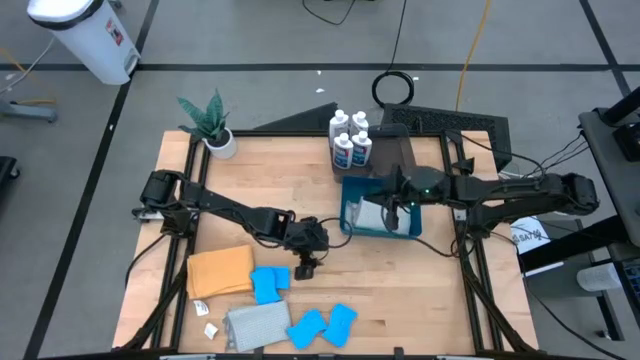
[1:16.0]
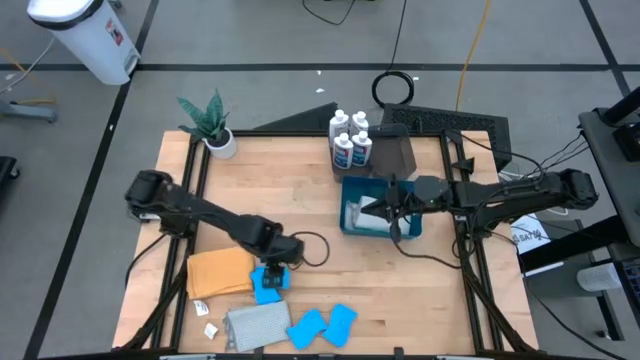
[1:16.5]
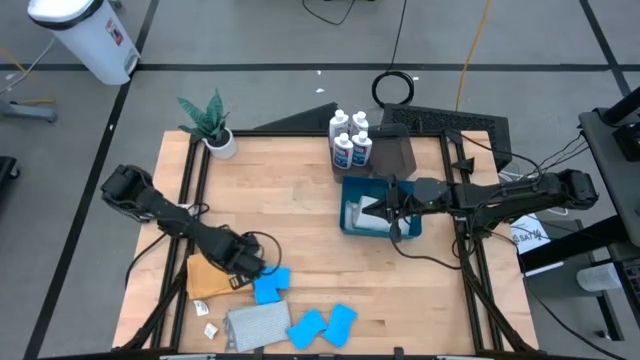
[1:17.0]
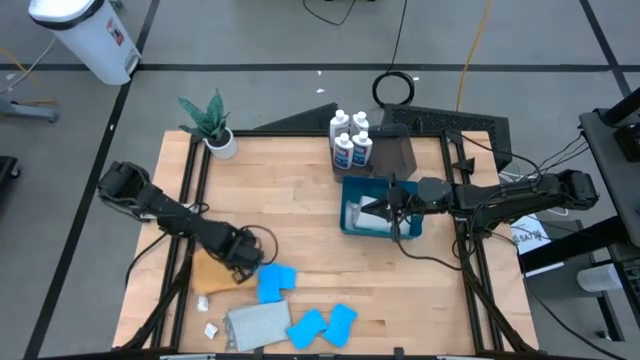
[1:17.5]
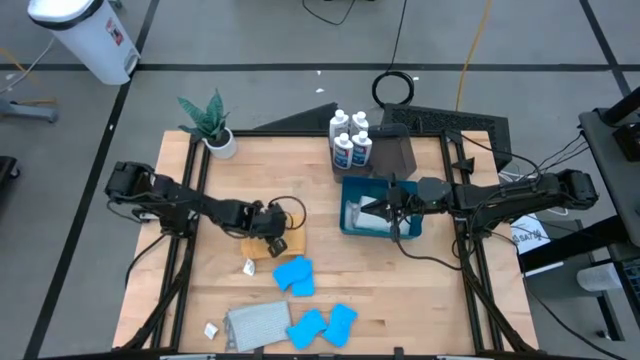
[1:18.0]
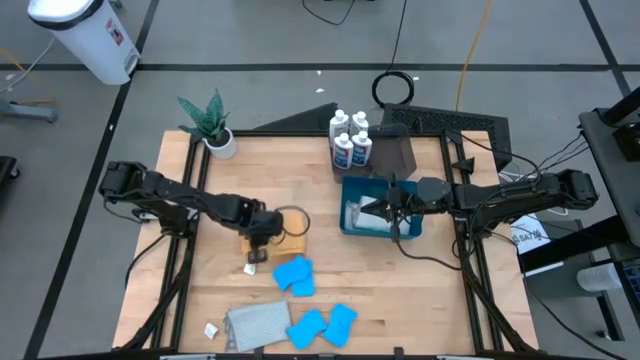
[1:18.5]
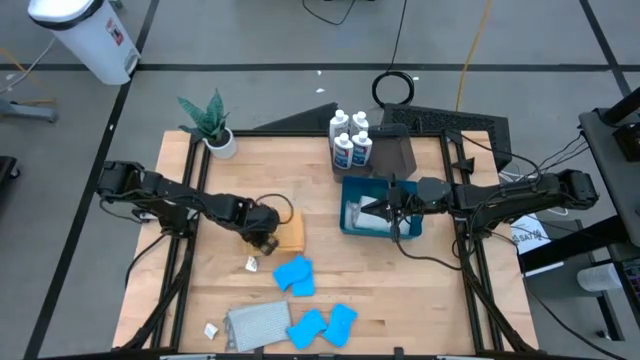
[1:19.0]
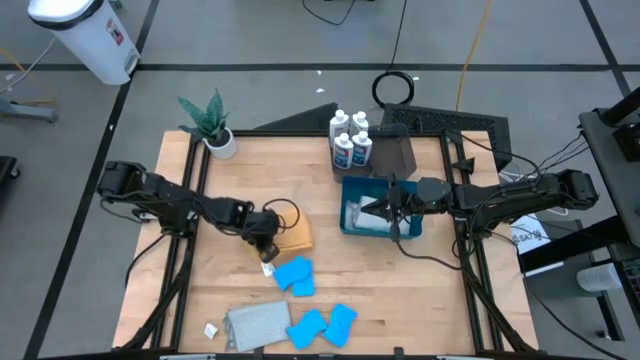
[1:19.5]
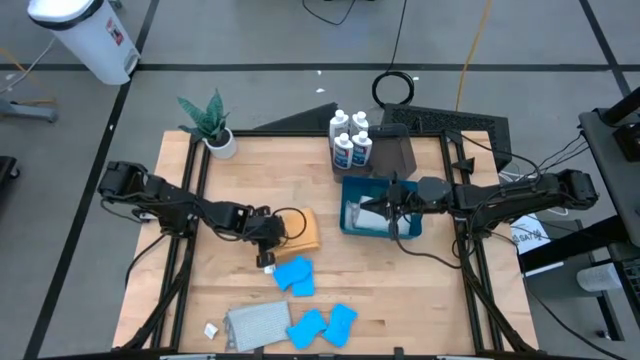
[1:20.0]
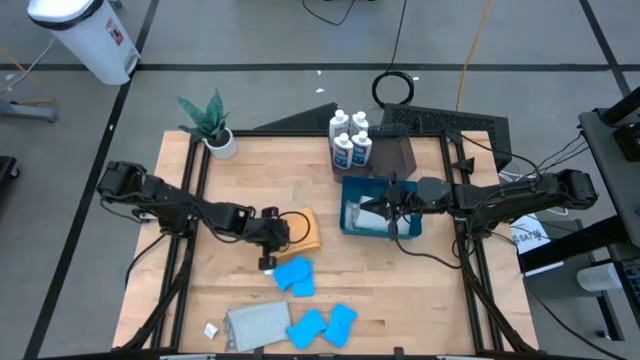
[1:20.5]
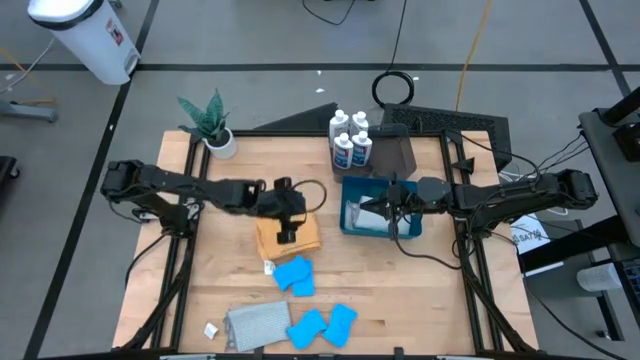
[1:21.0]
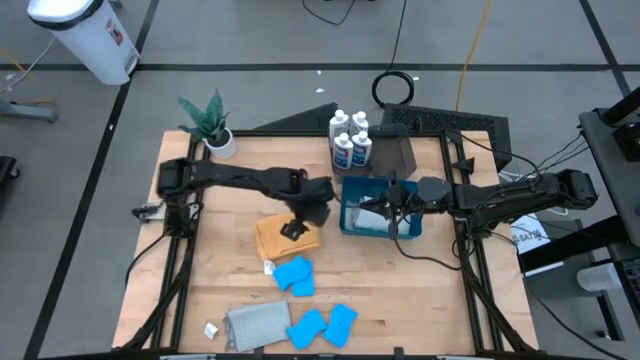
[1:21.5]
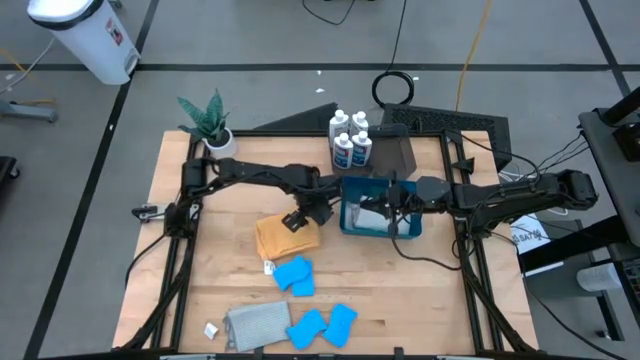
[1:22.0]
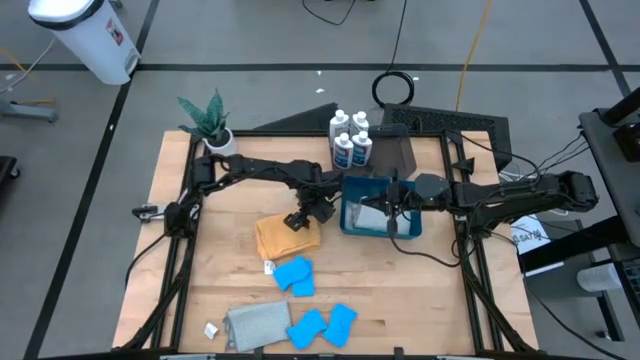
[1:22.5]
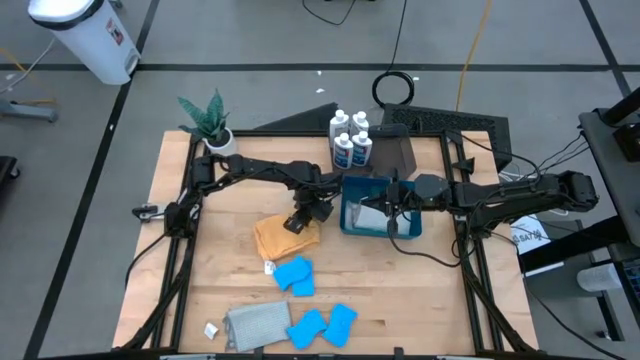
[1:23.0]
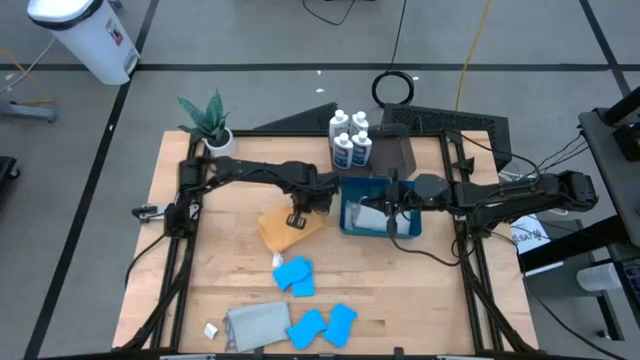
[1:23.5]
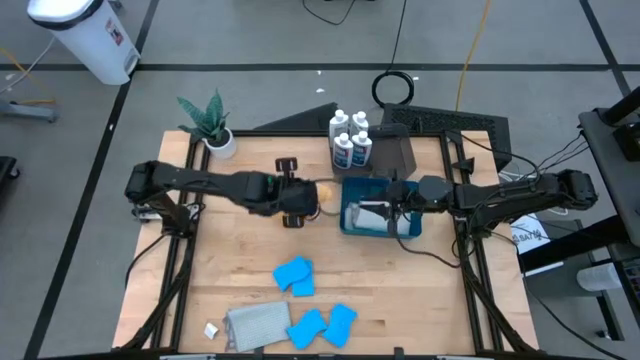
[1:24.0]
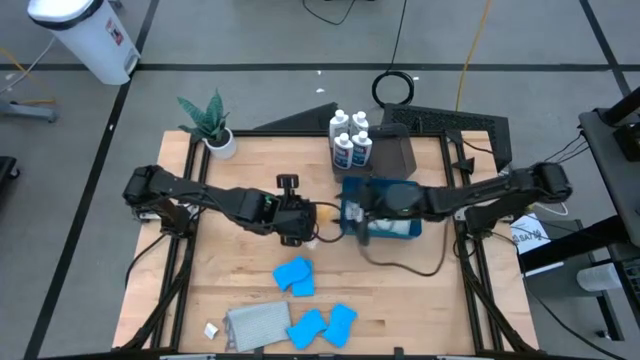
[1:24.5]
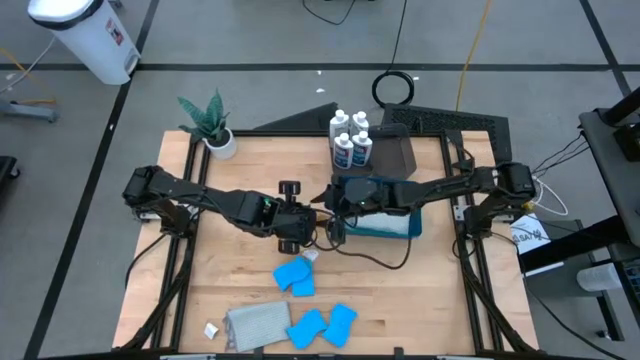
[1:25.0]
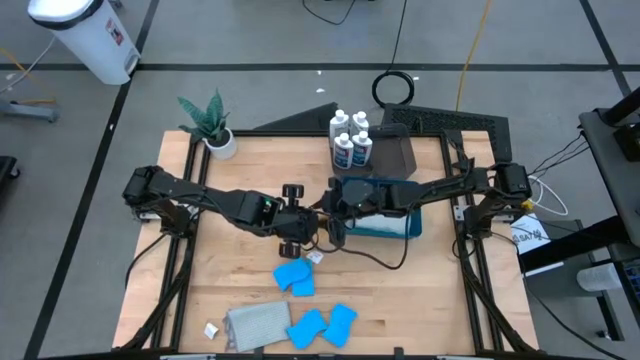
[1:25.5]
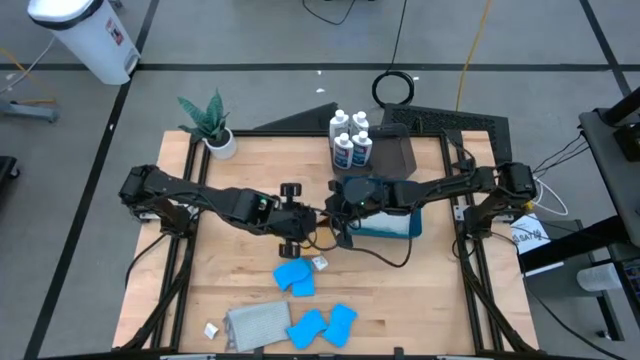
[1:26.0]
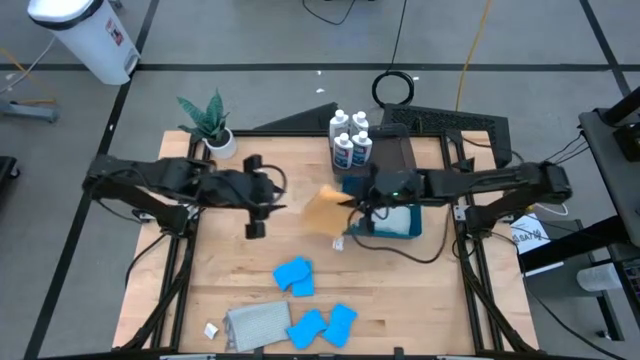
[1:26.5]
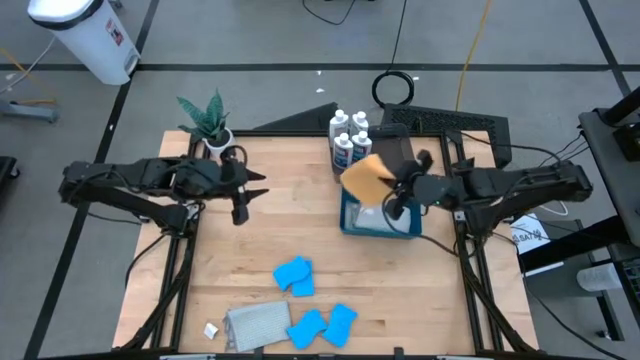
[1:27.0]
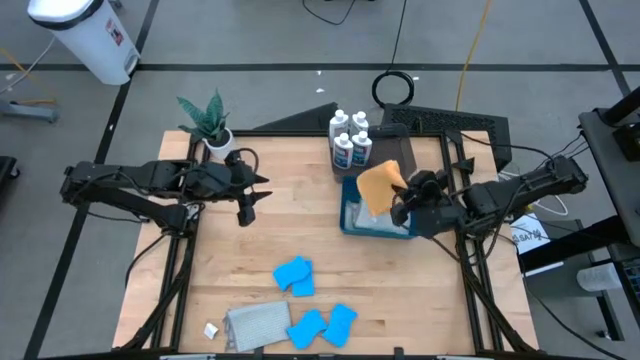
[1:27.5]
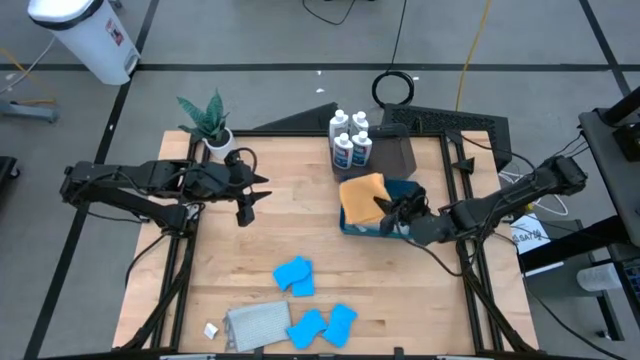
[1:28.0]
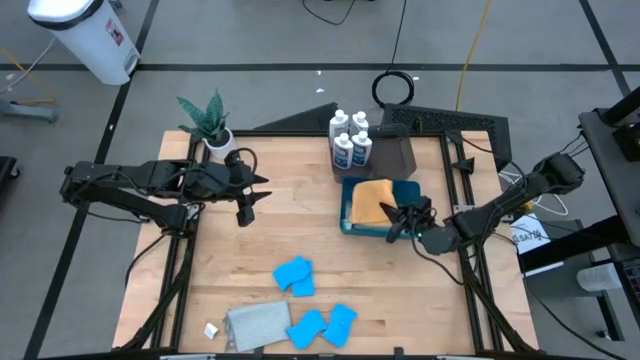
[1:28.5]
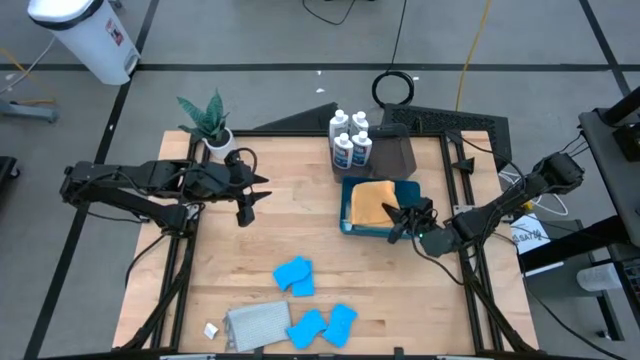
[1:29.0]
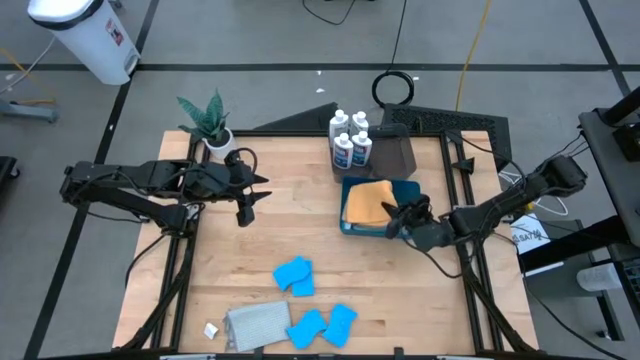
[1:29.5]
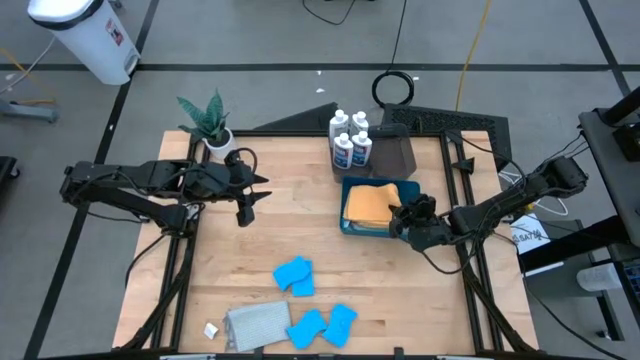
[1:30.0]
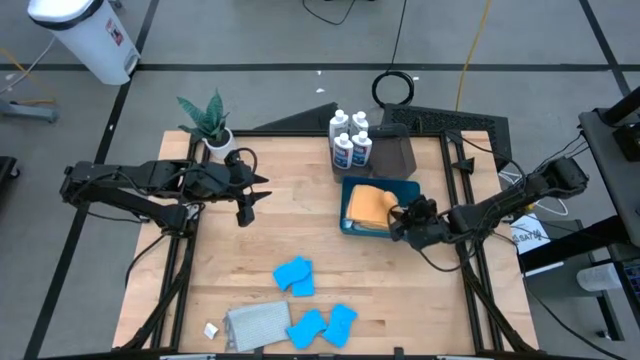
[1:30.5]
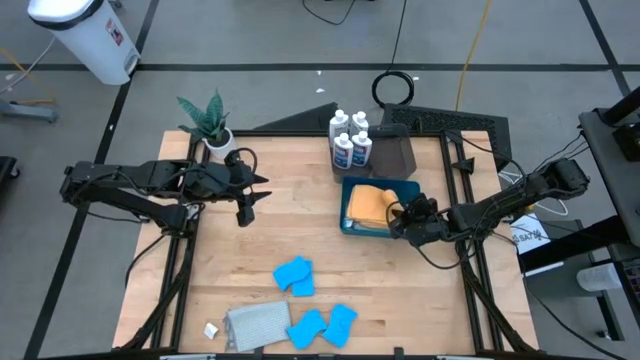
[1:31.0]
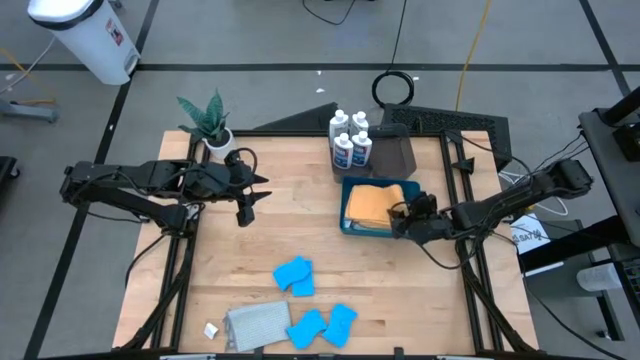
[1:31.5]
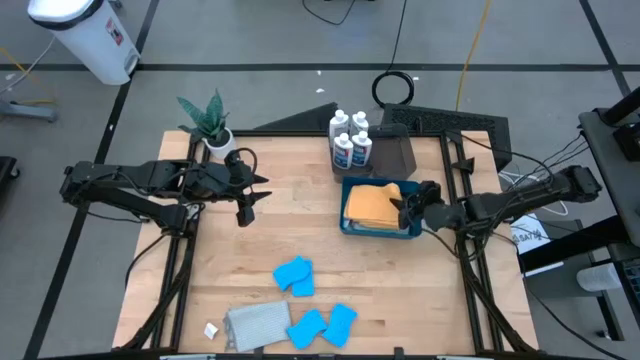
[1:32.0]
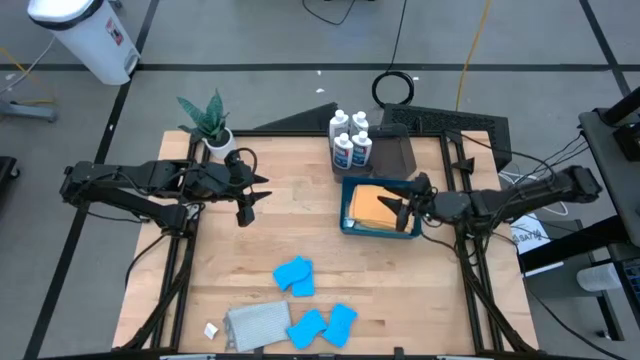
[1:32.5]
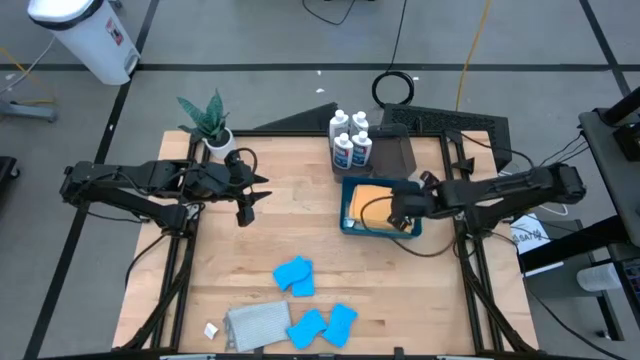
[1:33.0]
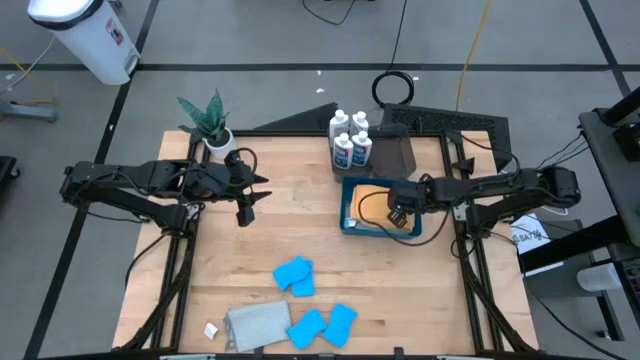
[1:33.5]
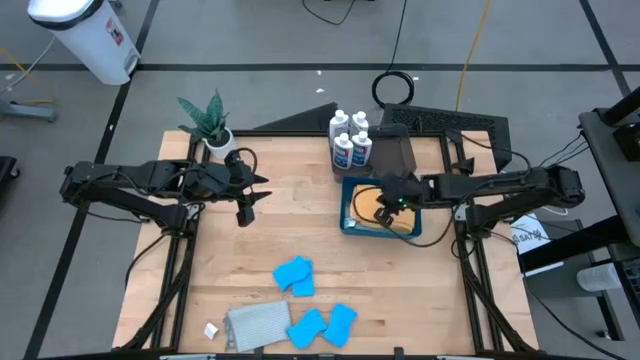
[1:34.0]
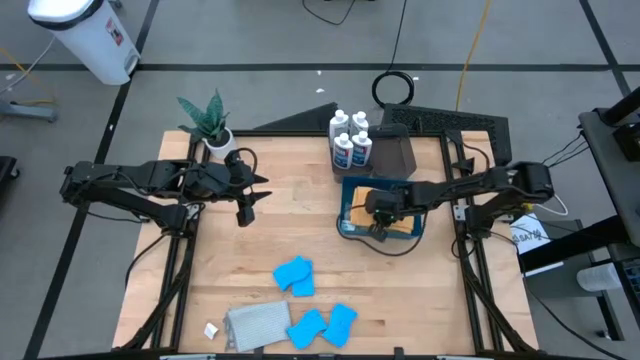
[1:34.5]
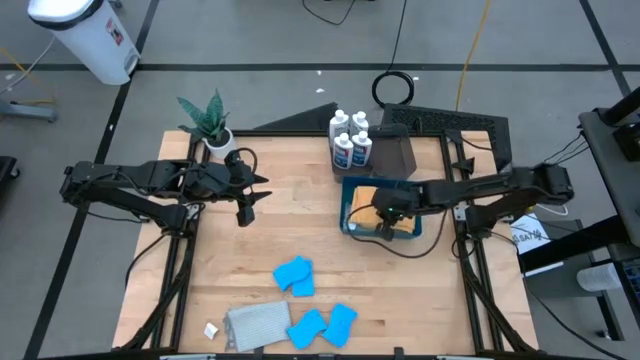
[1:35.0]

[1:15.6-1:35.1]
Task: Pick & Place Kitchen Items
Put the yellow napkin into the blue bin

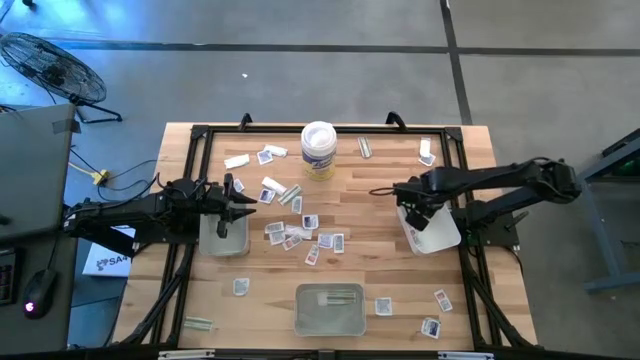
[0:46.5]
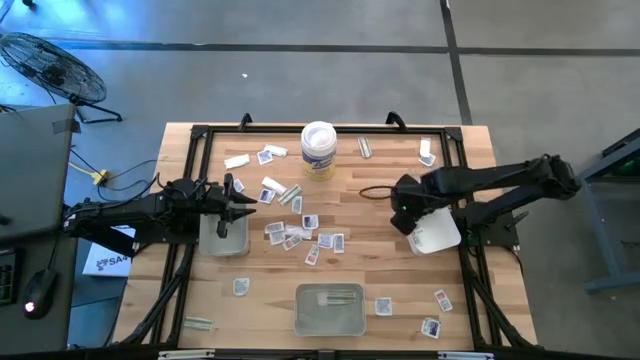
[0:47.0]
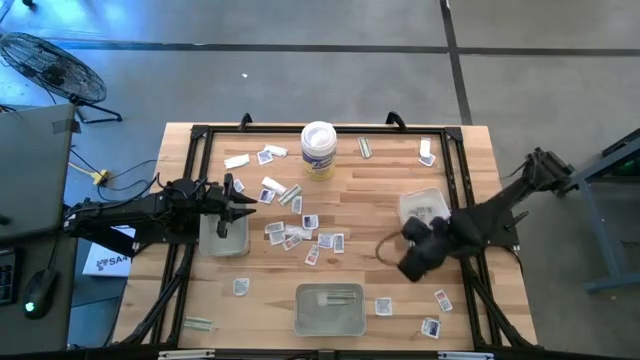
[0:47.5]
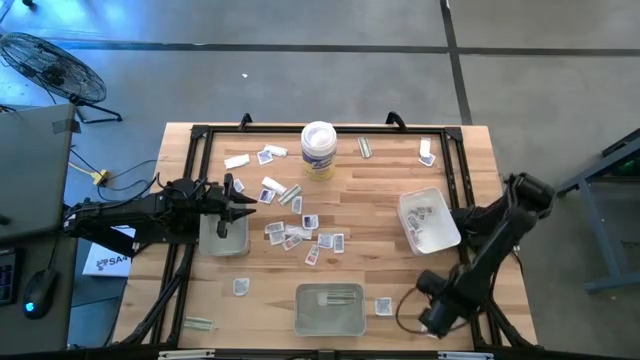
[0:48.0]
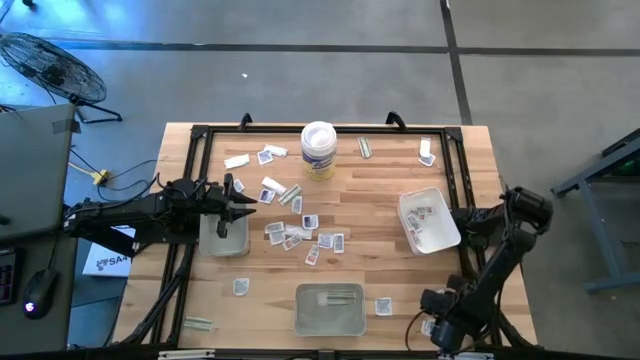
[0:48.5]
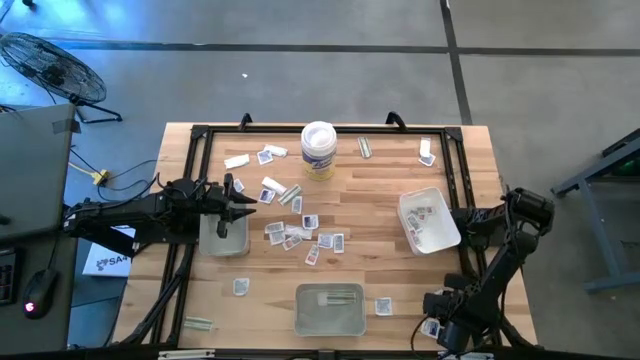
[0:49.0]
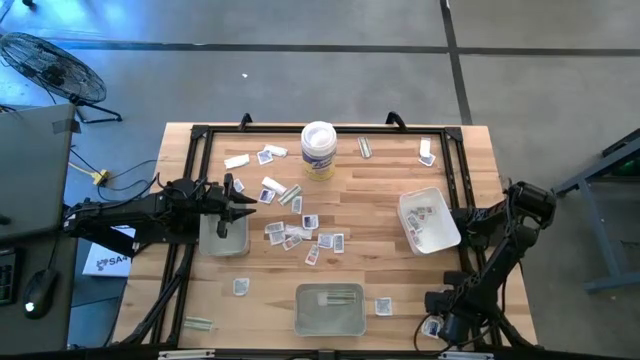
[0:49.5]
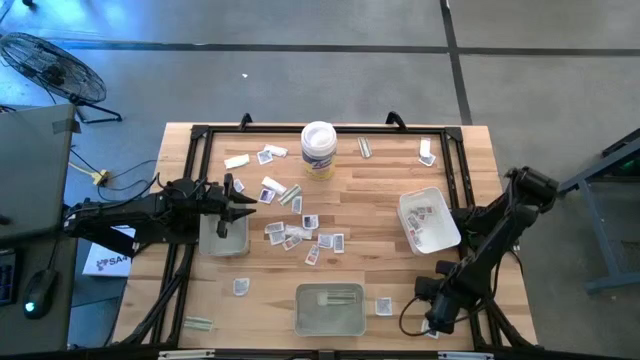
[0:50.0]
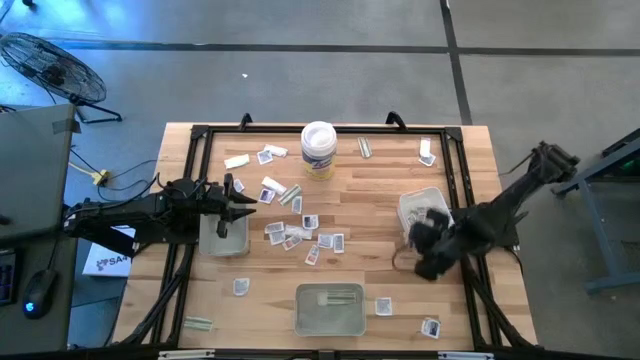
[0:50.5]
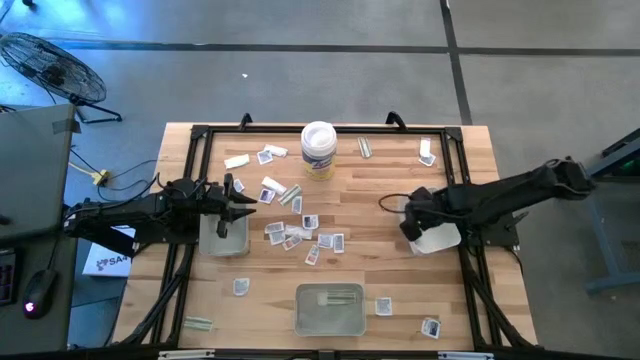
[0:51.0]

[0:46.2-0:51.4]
Task: Pick & Place First Aid Supplies
Put the orange ointment pack into the white bin
